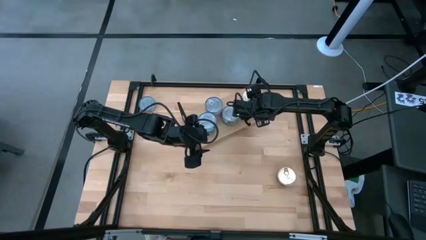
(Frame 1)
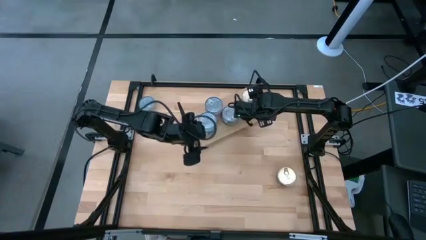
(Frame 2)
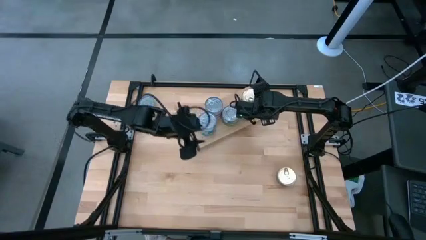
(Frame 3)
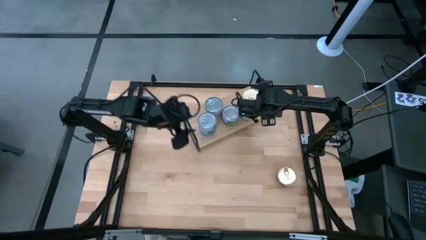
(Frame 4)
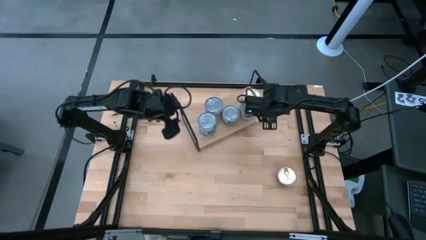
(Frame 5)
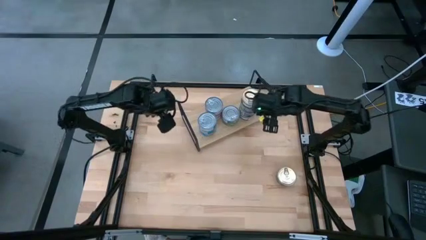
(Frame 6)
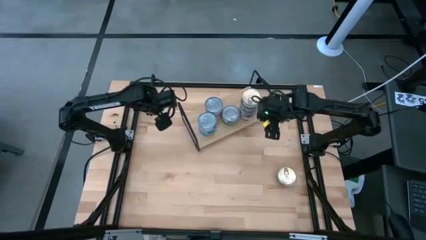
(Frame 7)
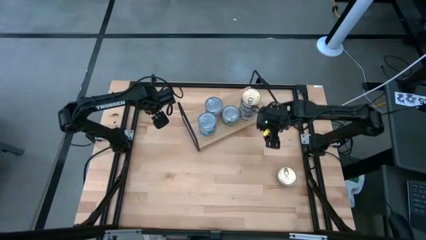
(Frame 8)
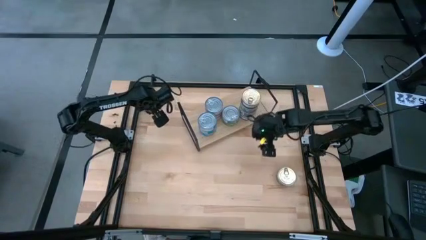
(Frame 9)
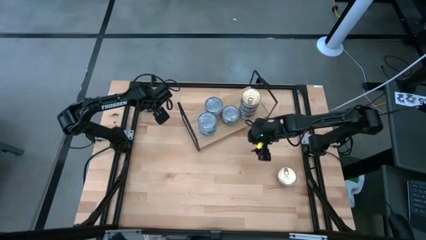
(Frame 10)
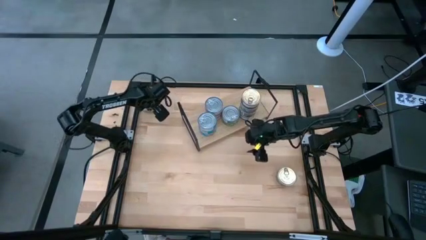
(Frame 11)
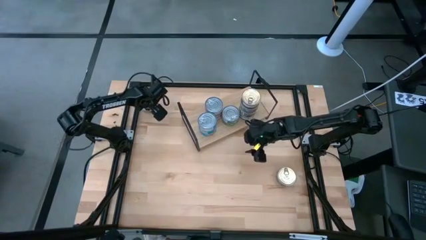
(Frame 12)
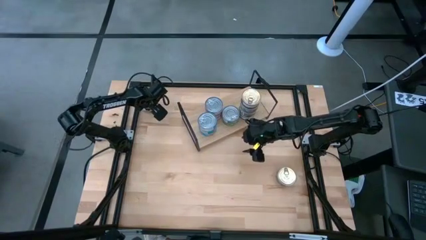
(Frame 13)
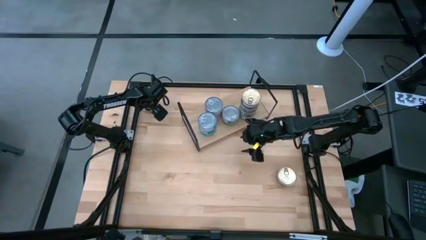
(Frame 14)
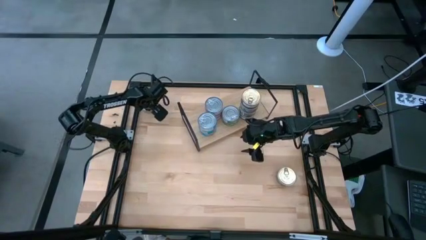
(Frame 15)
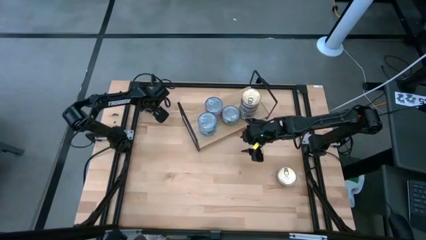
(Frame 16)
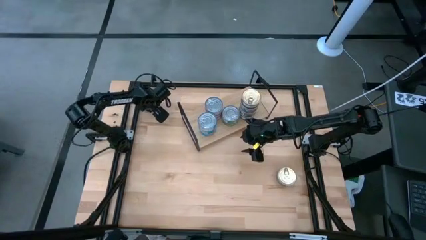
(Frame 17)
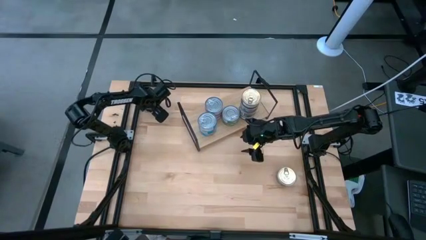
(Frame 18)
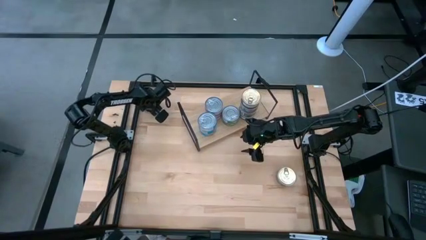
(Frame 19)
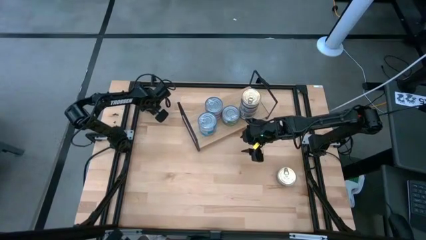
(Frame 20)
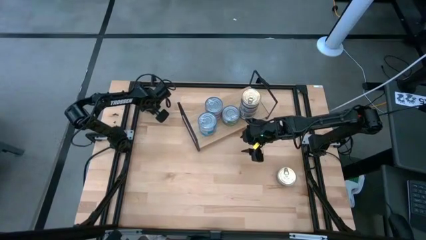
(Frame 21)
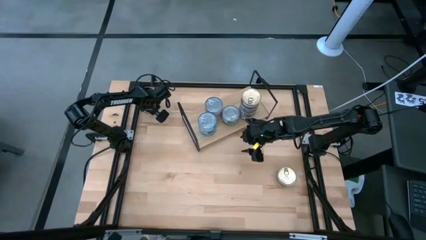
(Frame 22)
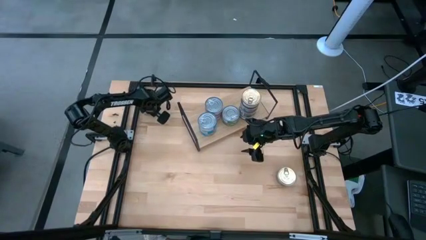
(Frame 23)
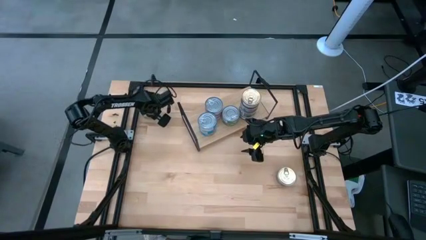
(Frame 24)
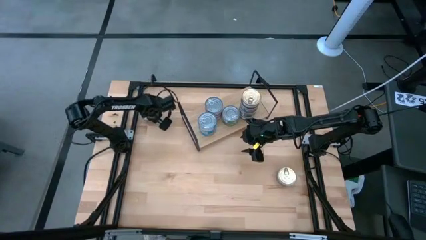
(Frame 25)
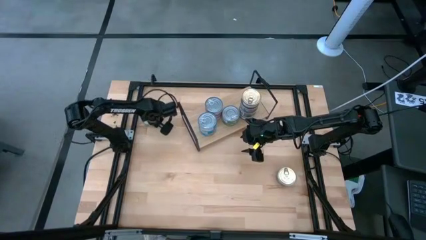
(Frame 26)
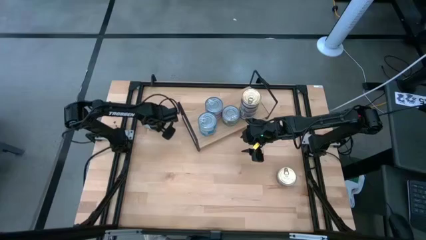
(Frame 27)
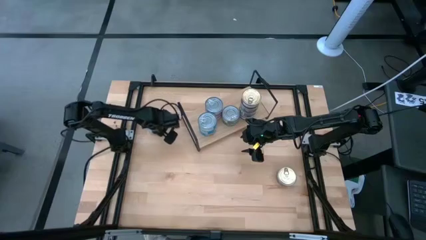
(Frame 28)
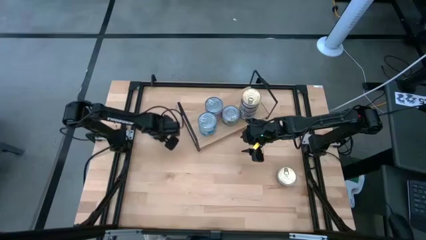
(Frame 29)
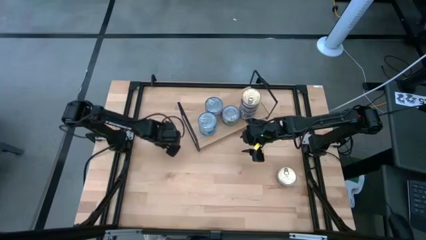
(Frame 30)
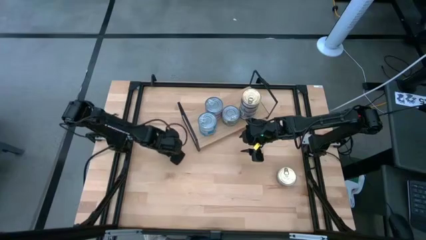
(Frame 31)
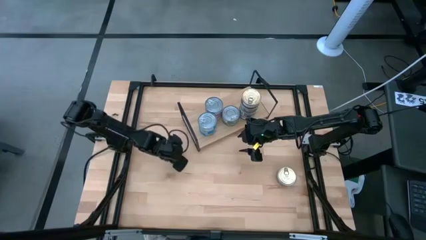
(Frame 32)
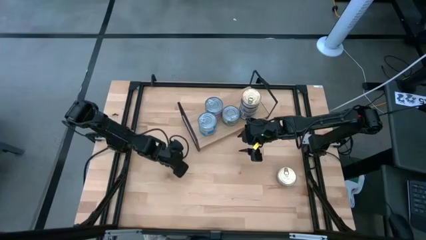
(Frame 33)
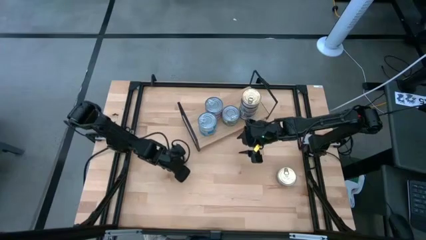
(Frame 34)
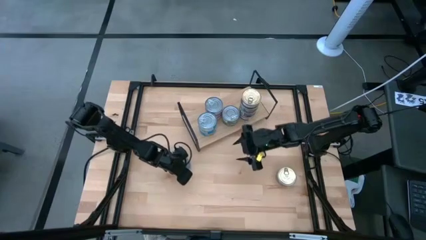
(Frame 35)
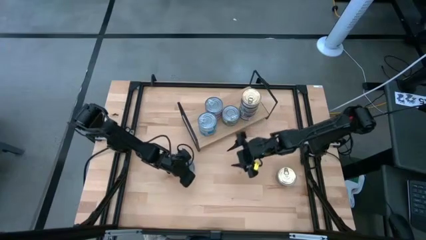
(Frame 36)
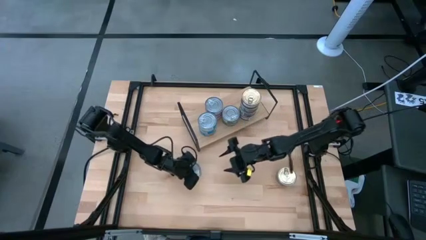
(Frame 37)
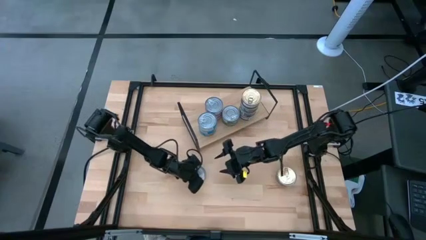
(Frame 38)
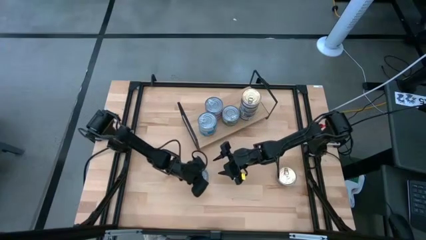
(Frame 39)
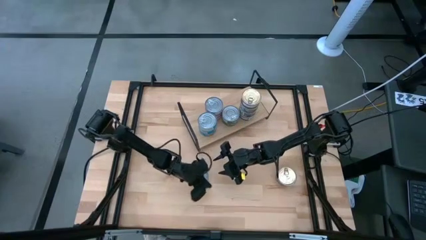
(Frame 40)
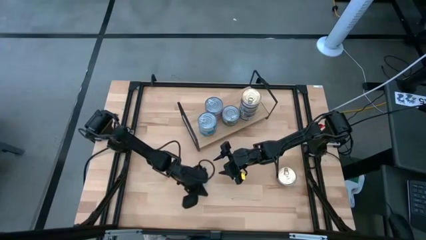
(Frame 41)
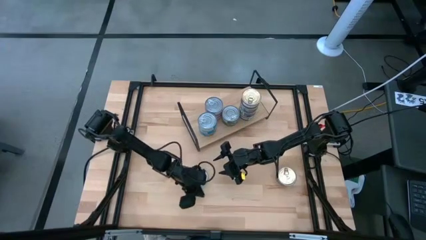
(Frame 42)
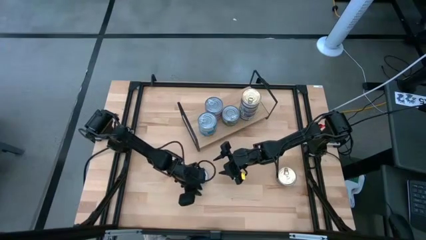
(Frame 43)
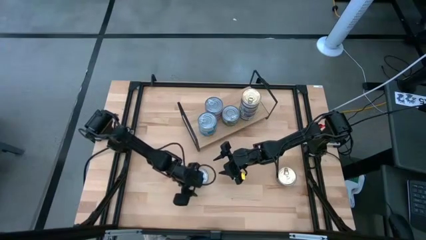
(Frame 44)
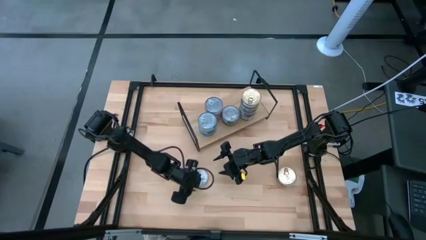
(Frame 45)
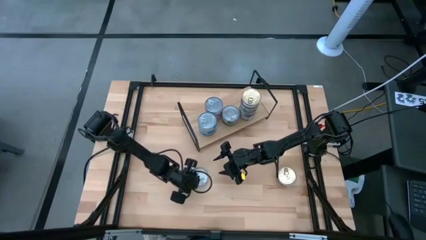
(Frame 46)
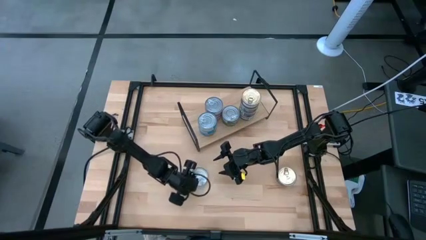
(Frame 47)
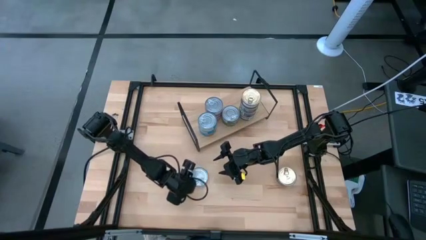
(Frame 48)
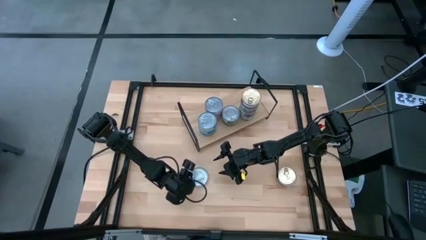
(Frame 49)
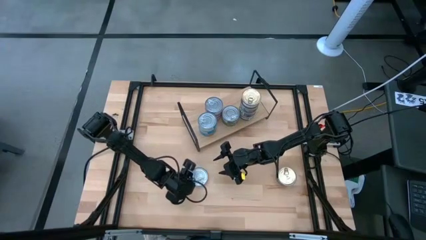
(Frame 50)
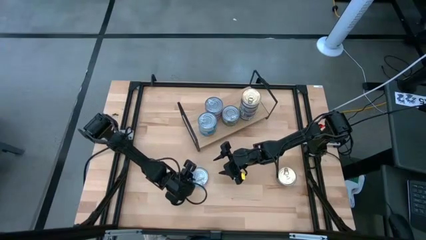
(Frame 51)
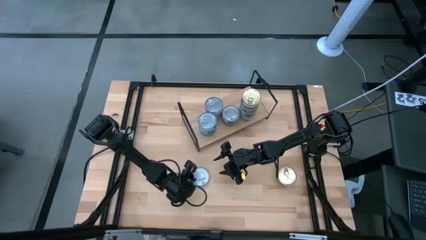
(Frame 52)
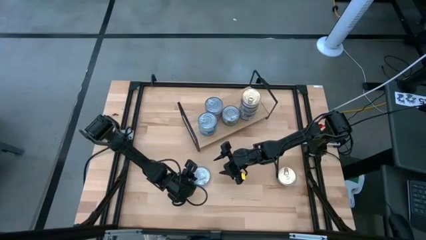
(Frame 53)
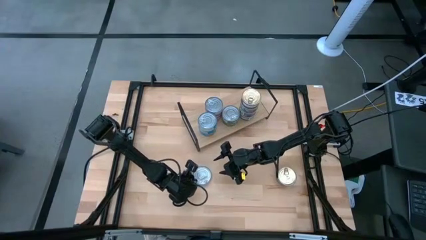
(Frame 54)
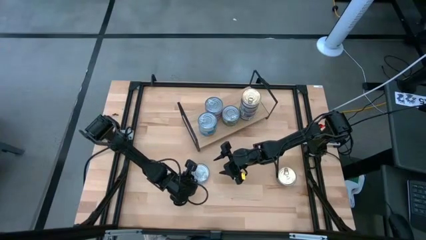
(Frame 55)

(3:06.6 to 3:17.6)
Task: Stack canned seafood by type on shelf
Stack the yellow and blue tuna can on the shelf on top of the other yellow and blue tuna can

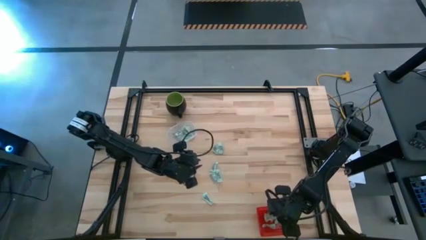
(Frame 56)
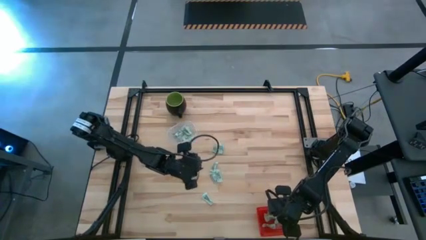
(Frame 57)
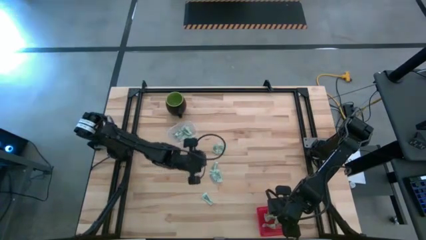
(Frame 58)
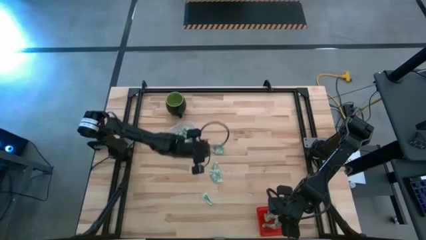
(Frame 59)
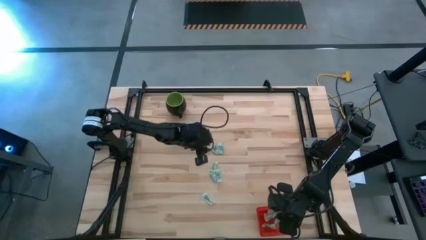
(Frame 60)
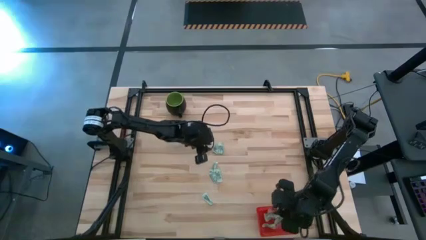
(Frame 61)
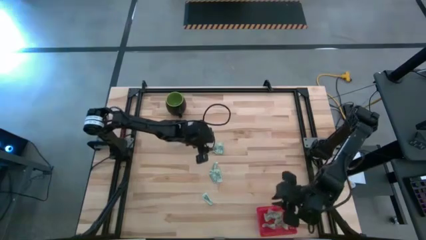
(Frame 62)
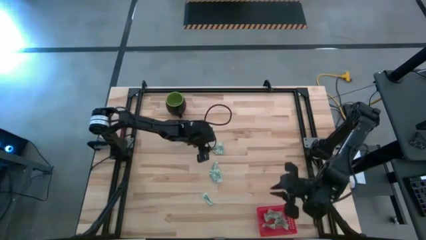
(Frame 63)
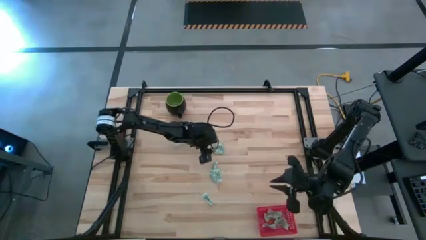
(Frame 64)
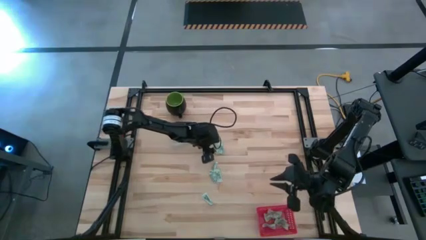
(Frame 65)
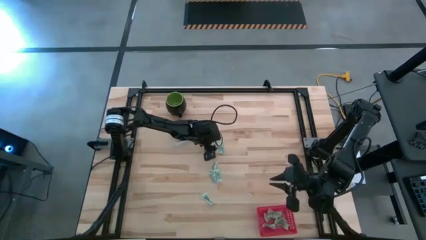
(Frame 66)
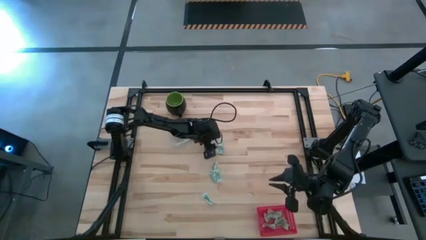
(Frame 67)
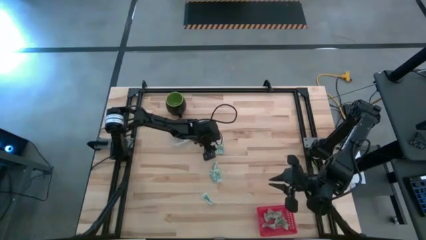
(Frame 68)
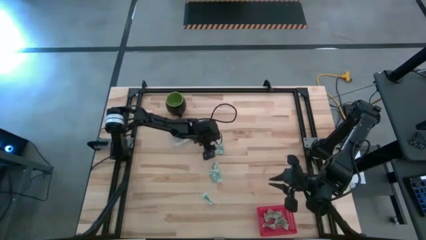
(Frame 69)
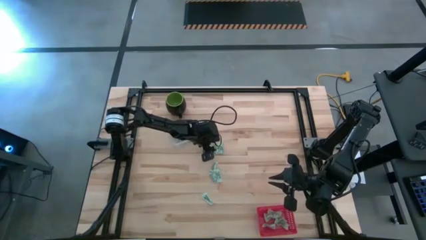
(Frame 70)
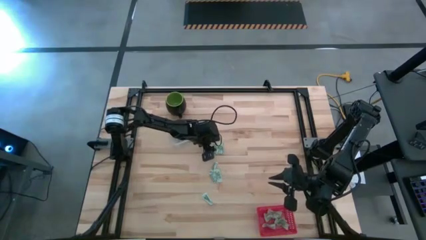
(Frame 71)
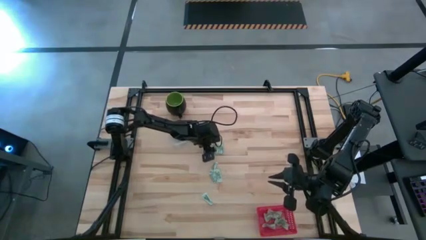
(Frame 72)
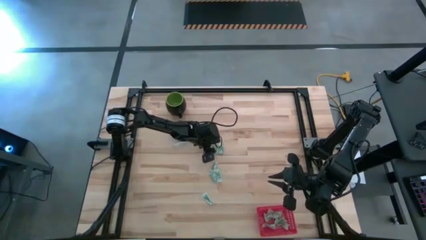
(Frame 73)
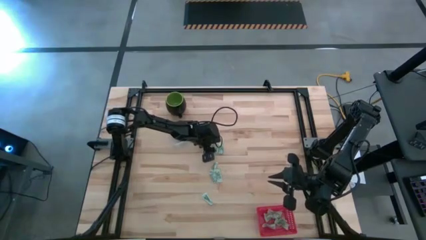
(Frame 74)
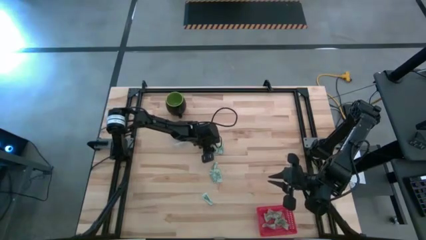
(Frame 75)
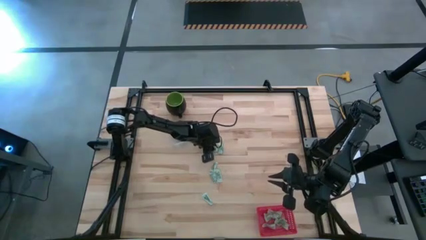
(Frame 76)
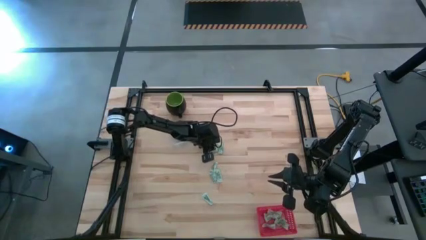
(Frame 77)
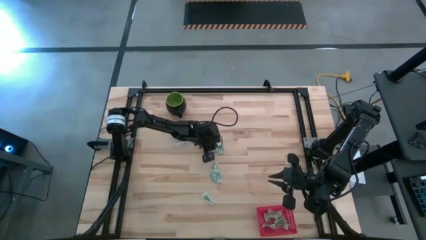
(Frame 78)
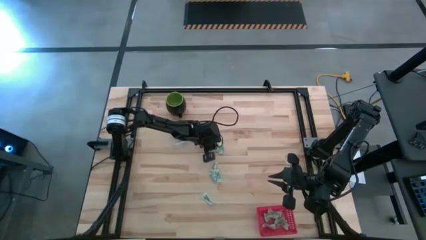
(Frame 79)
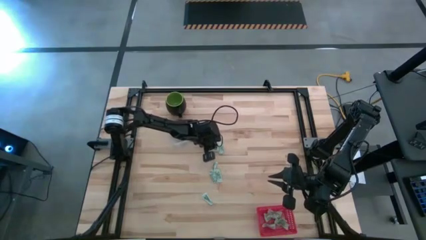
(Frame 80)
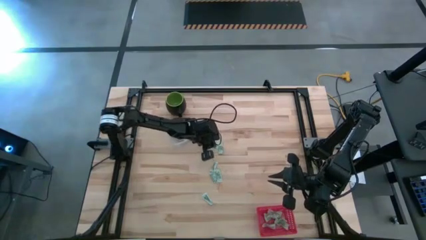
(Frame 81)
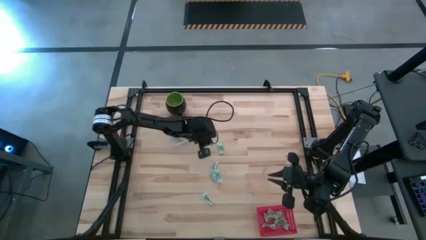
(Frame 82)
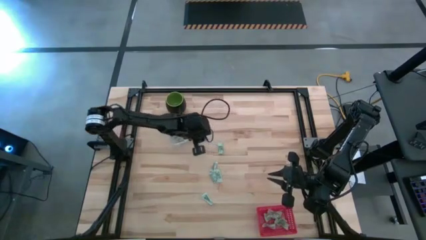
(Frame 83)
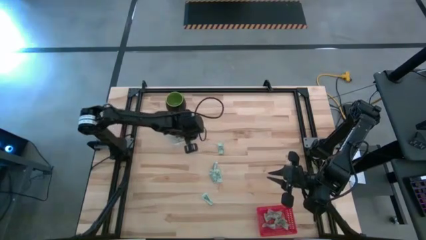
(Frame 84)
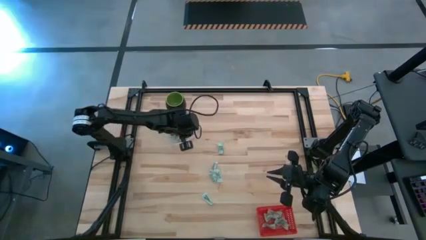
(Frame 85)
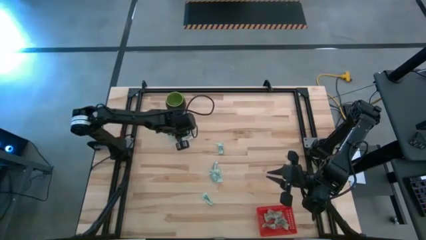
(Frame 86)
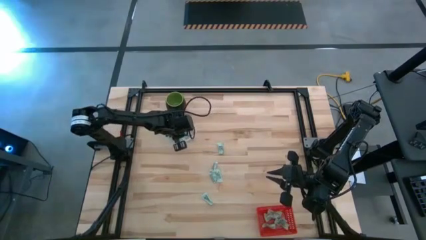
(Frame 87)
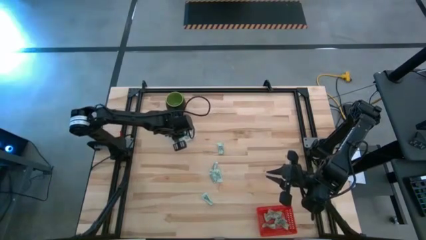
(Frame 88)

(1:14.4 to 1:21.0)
Task: Pick and place items into bin
Put the green stevia packet into the transparent bin
